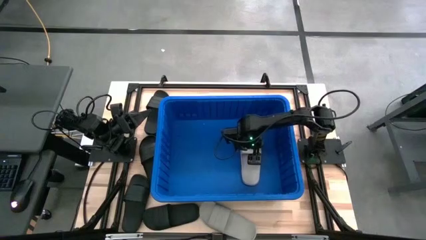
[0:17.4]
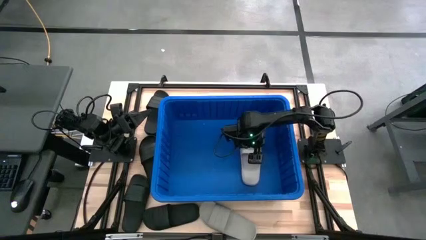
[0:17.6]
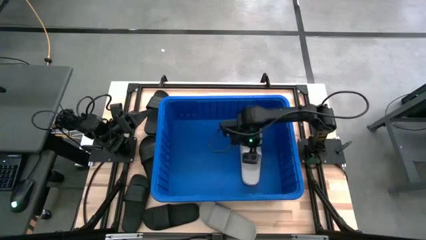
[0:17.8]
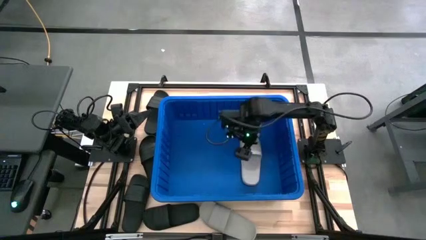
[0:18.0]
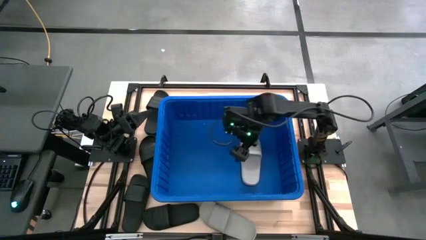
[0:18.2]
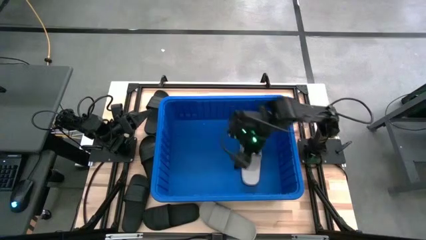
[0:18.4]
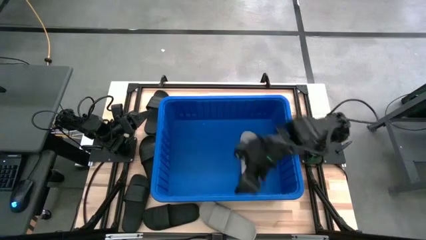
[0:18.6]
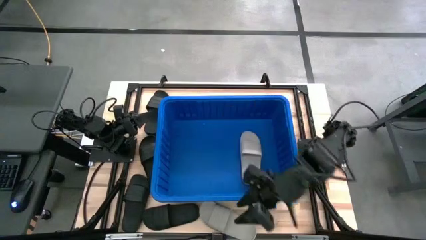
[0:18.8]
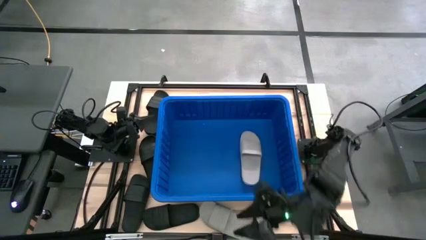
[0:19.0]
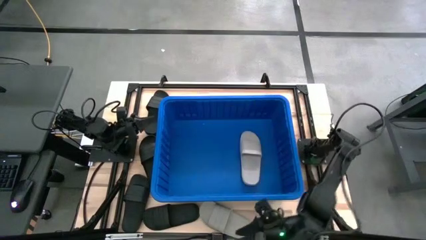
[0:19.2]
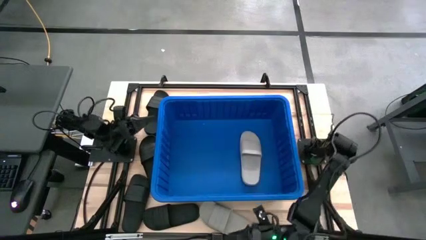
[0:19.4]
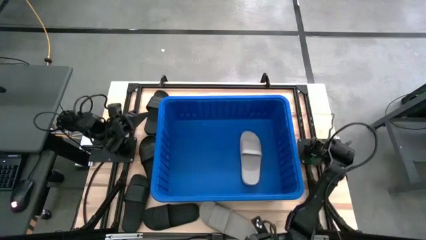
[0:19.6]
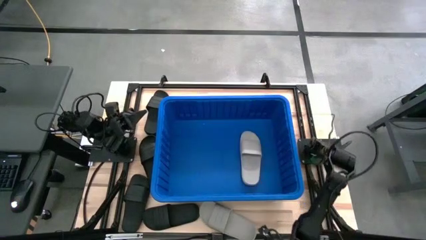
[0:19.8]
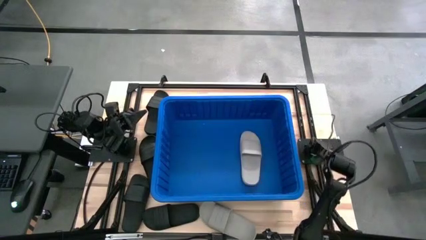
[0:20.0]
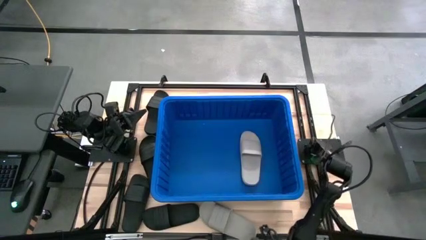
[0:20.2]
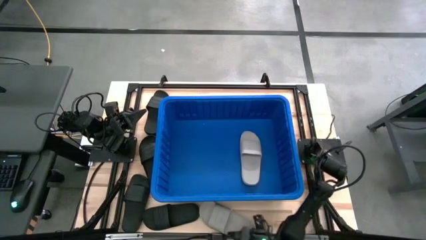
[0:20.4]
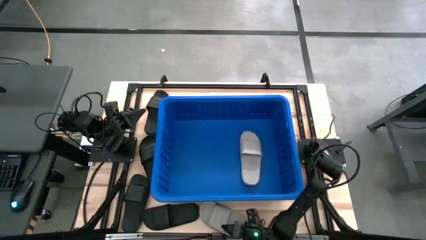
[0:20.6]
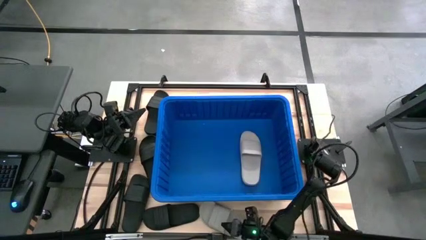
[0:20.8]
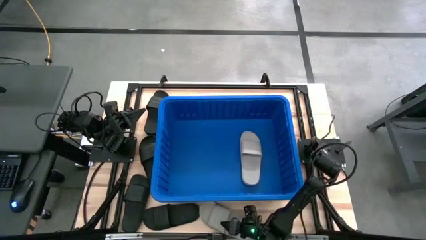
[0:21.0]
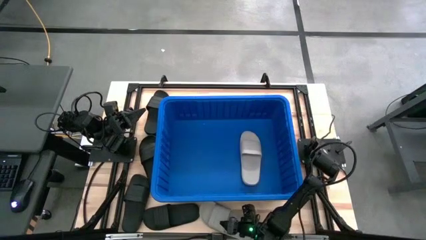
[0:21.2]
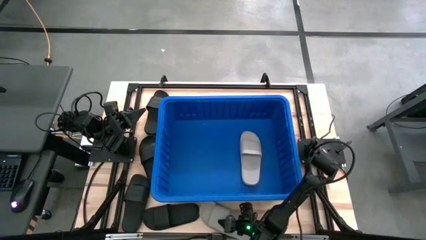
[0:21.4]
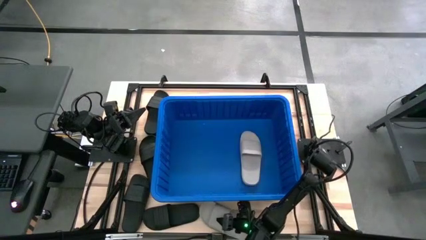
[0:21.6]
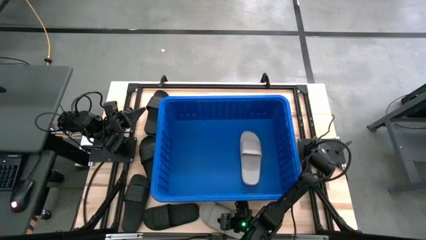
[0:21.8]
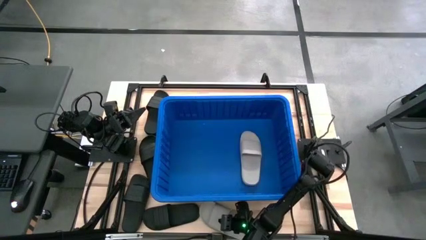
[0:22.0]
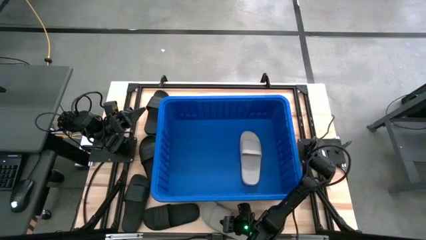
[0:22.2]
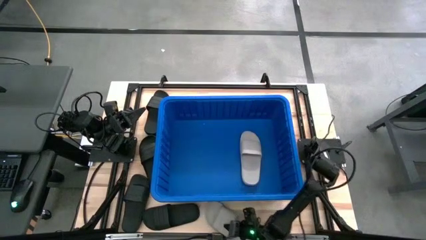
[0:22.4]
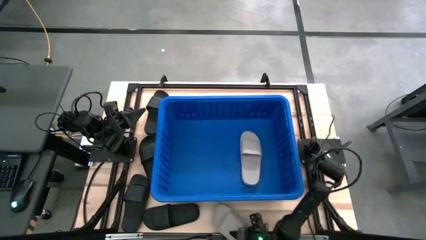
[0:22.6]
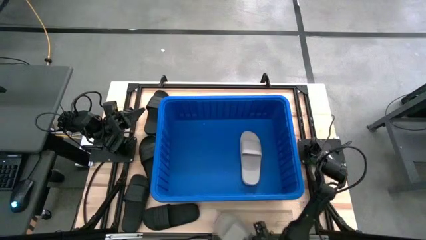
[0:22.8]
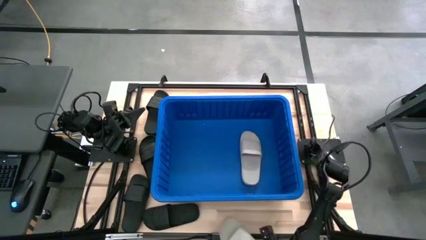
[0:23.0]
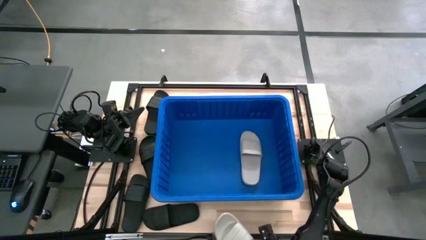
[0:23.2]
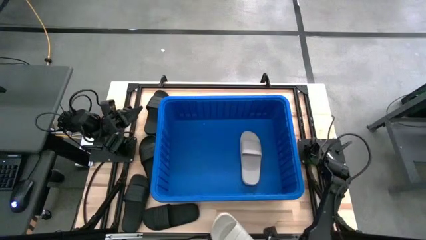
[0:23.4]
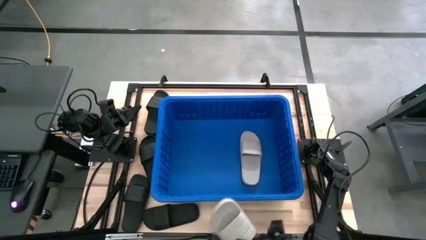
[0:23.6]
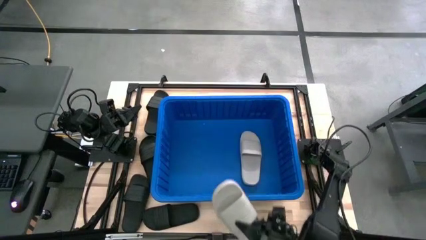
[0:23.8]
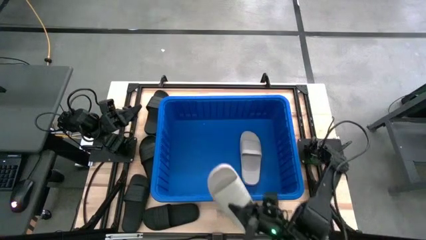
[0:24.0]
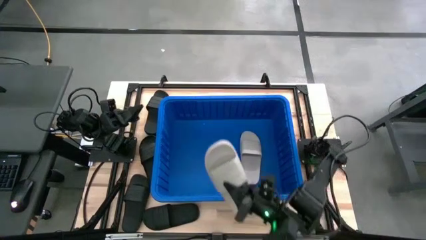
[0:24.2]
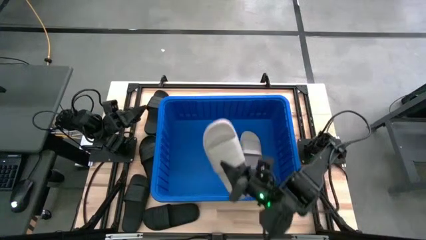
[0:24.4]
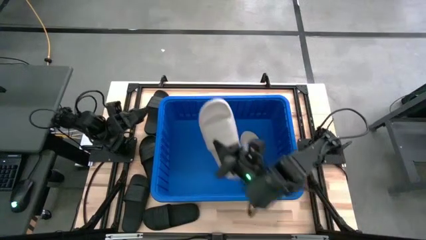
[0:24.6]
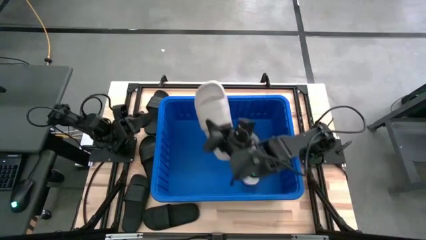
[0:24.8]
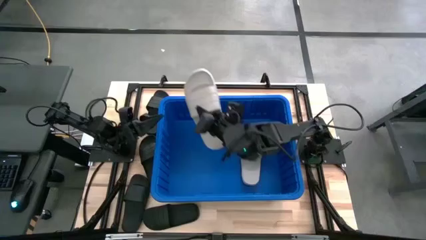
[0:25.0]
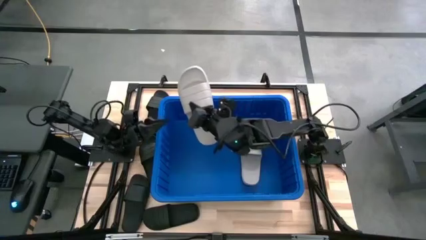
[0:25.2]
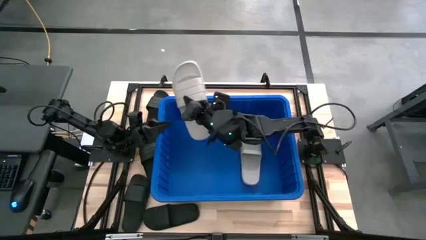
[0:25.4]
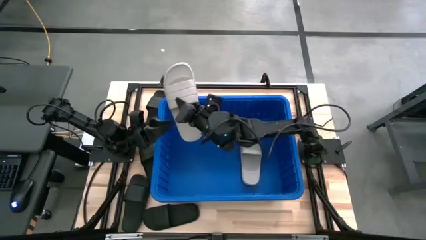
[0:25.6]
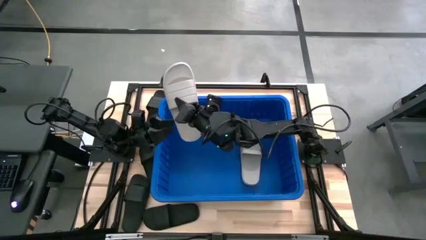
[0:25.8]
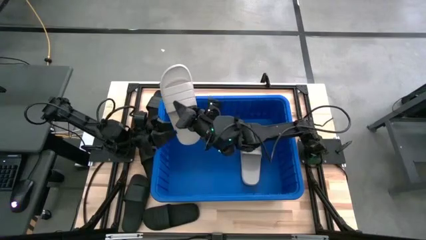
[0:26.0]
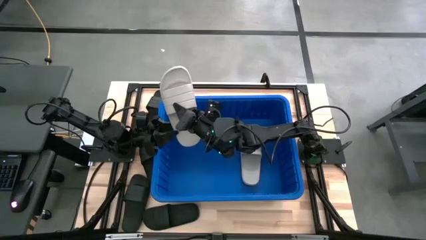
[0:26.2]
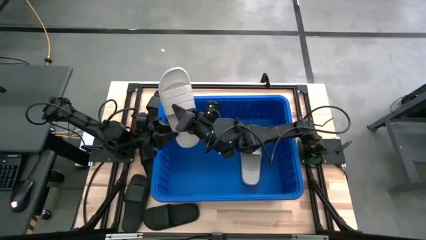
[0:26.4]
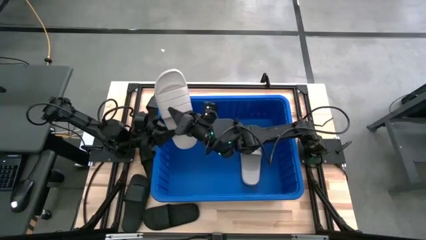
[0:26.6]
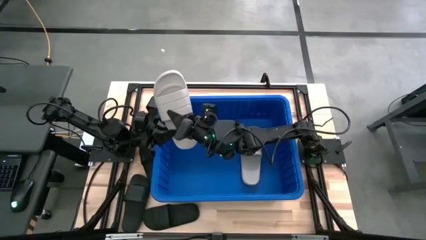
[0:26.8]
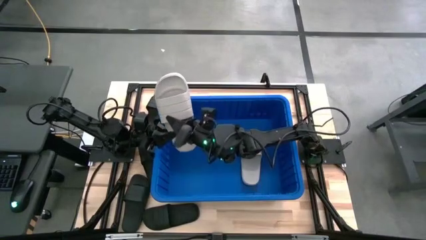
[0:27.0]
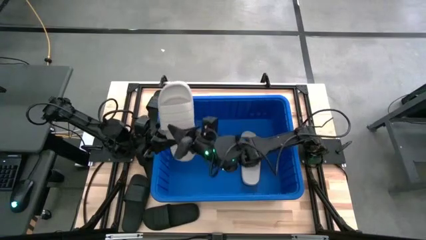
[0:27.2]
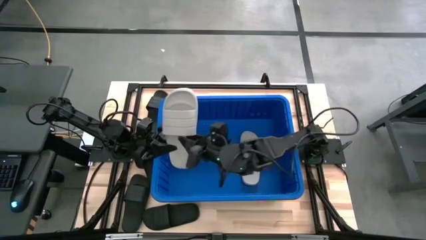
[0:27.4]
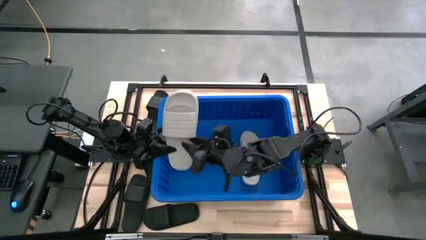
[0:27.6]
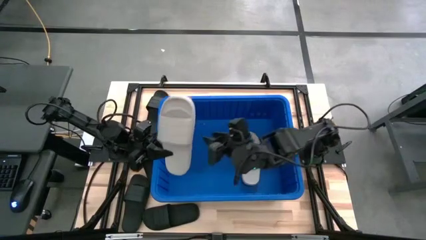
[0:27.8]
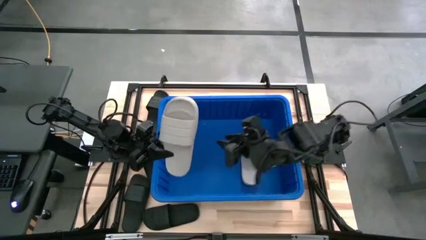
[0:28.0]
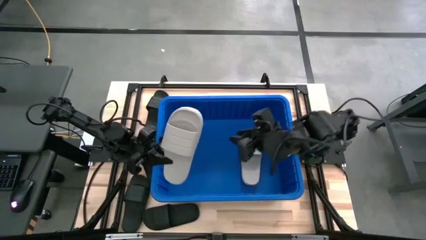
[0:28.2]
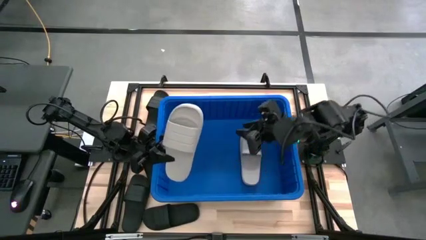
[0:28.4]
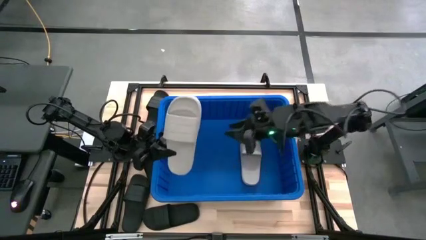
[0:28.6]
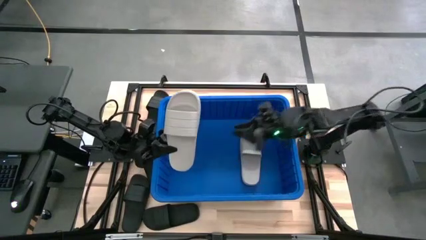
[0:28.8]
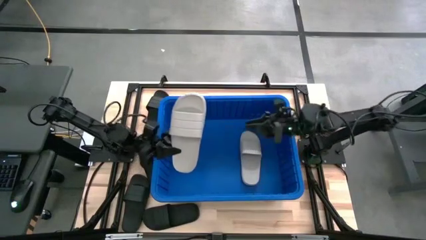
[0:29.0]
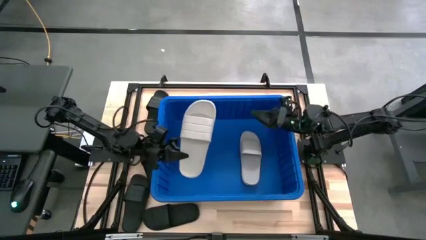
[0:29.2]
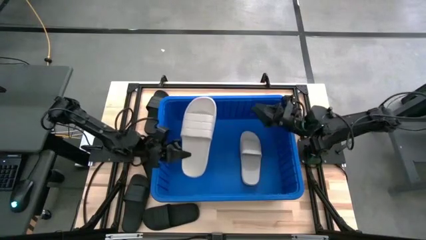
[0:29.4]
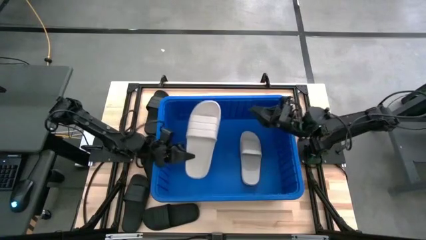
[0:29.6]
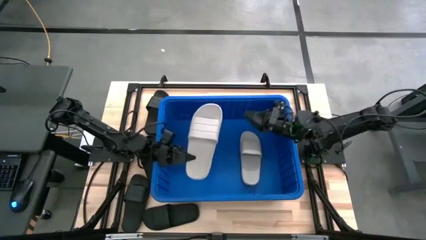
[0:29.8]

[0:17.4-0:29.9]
Task: Pick and place slides into bin
Put the gray slide into the blue organizer bin
